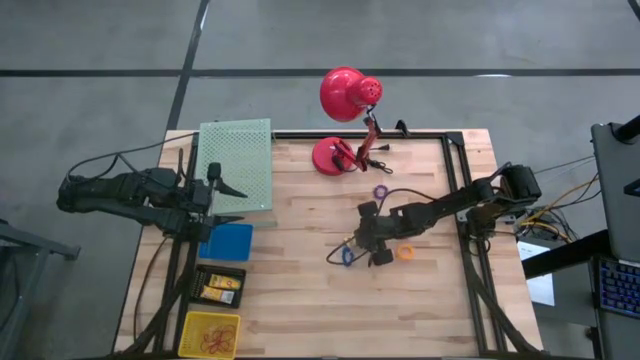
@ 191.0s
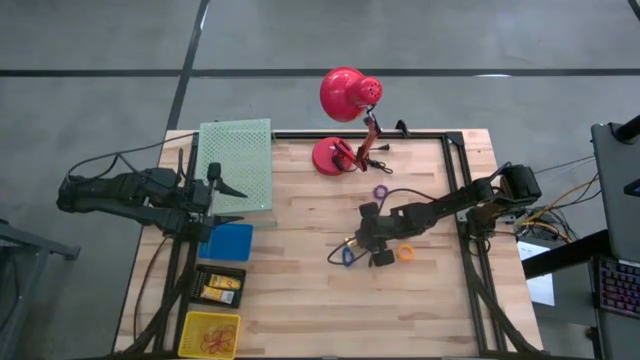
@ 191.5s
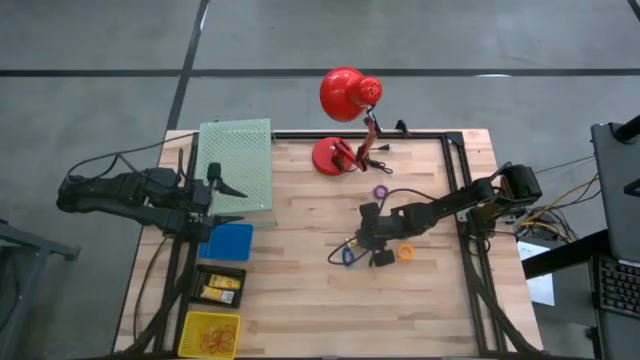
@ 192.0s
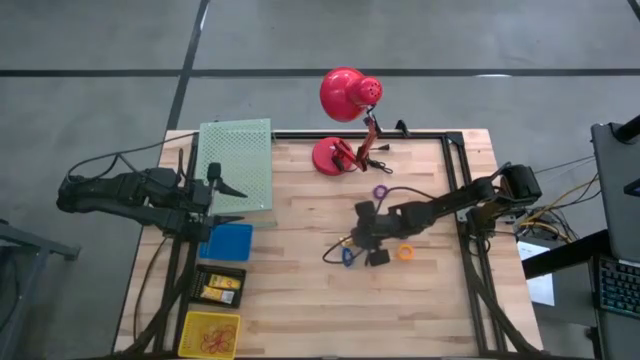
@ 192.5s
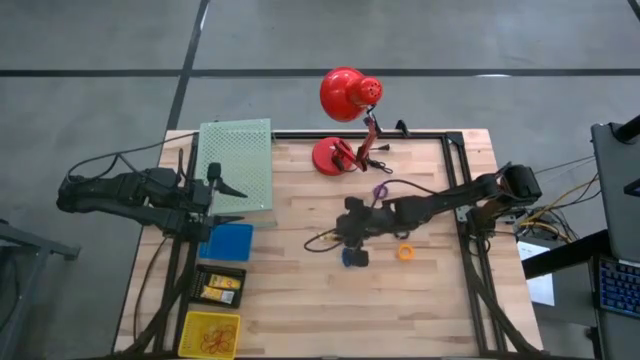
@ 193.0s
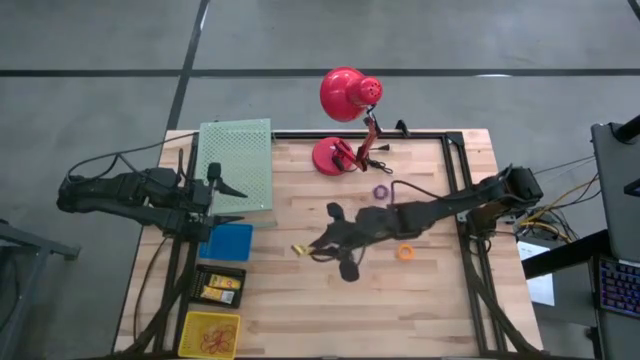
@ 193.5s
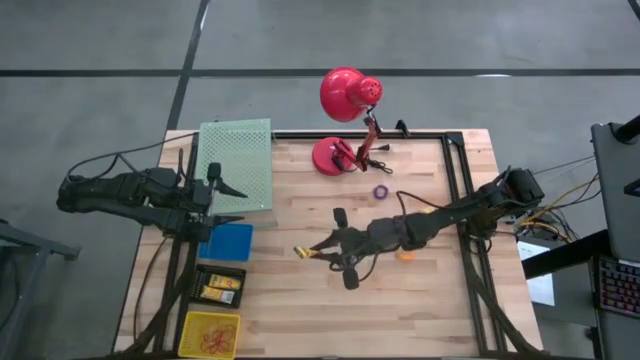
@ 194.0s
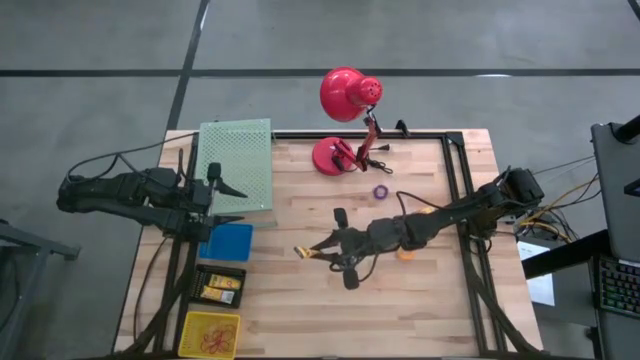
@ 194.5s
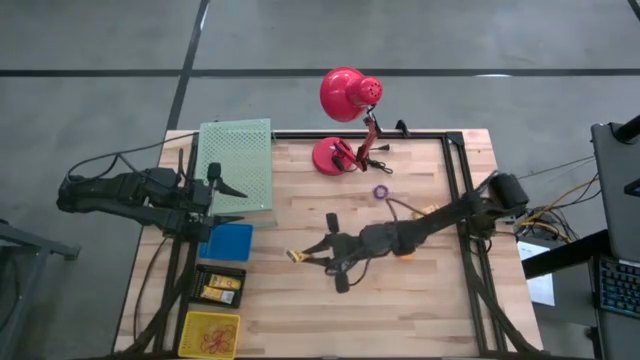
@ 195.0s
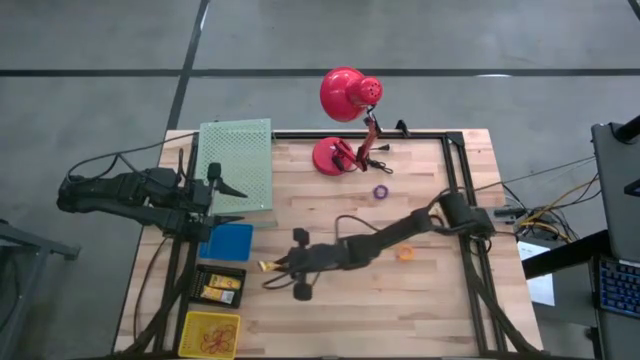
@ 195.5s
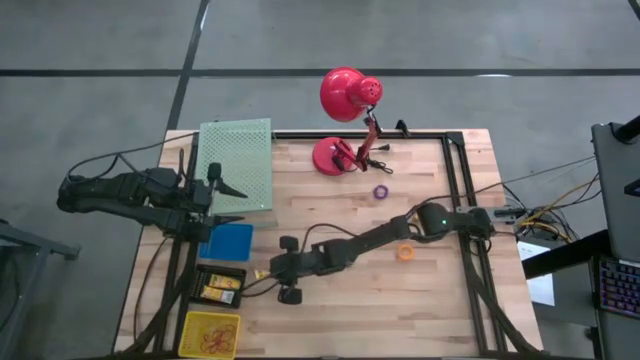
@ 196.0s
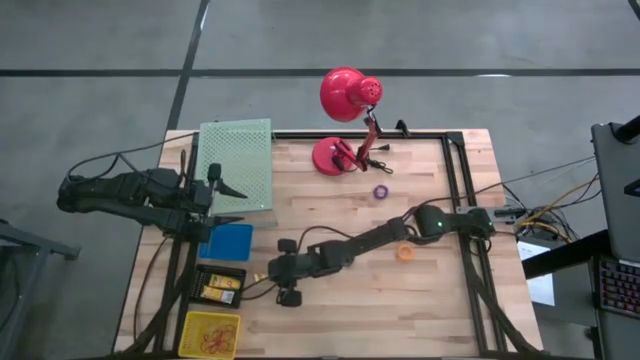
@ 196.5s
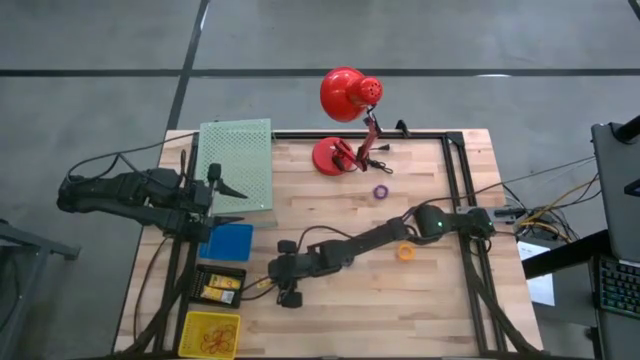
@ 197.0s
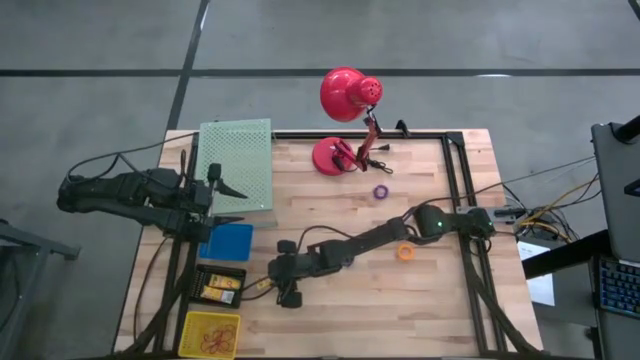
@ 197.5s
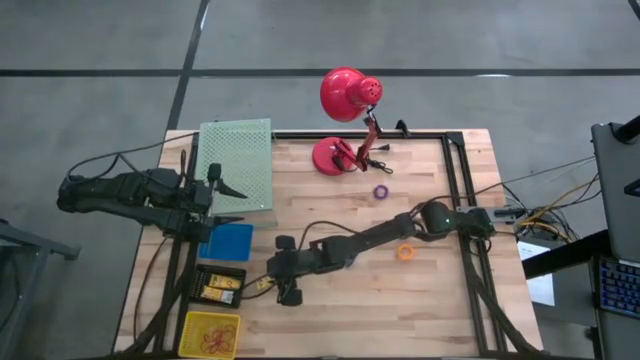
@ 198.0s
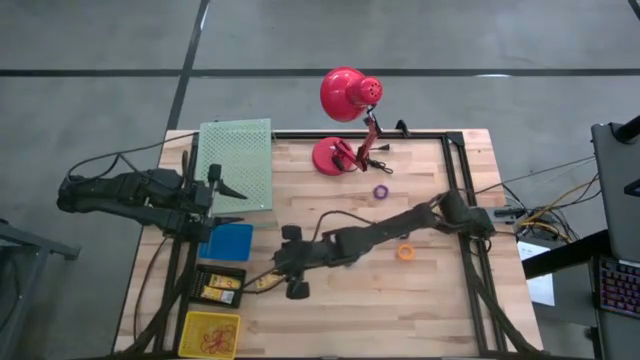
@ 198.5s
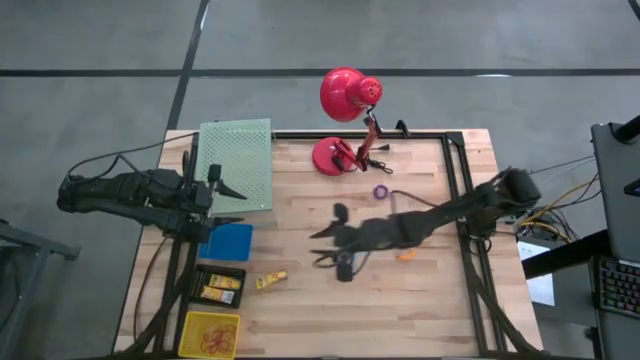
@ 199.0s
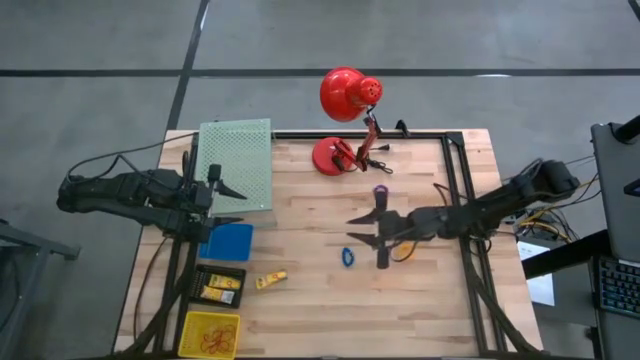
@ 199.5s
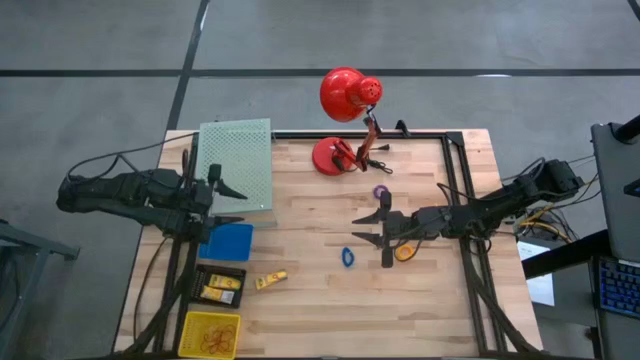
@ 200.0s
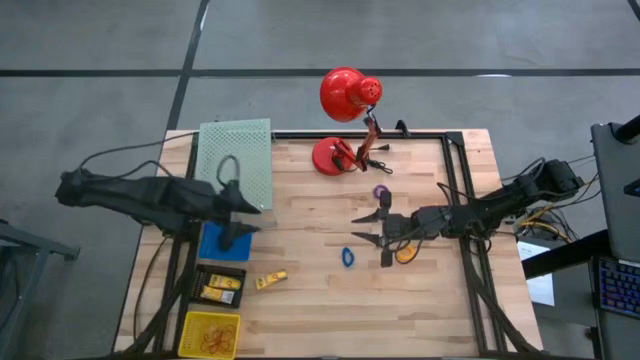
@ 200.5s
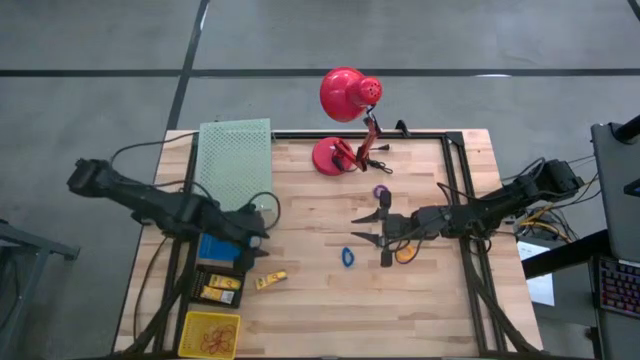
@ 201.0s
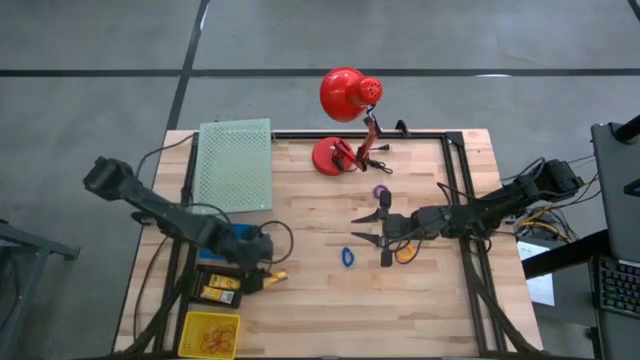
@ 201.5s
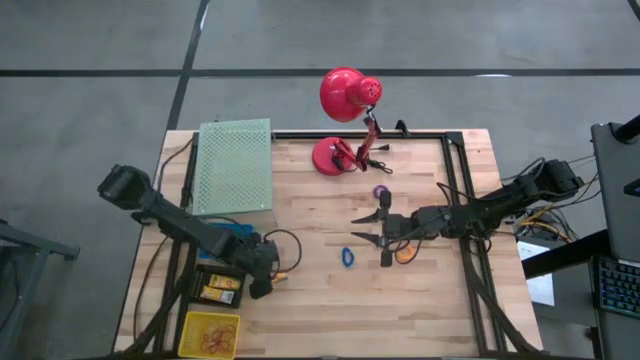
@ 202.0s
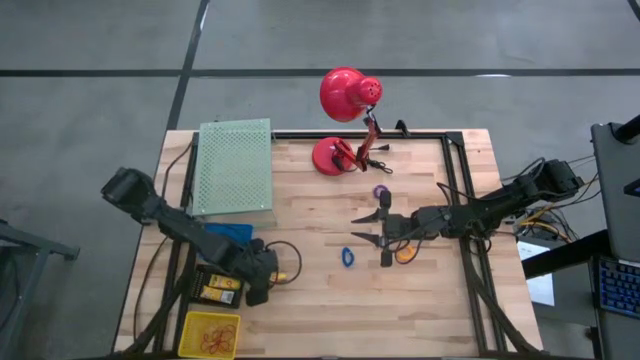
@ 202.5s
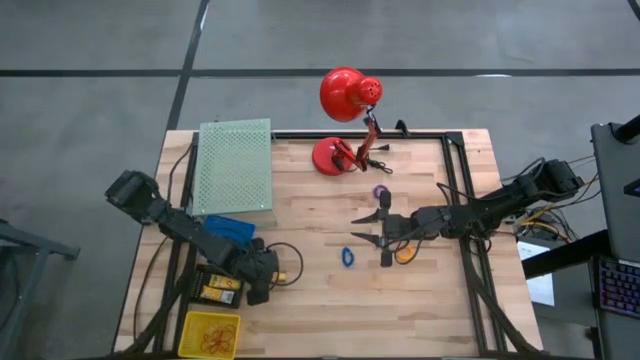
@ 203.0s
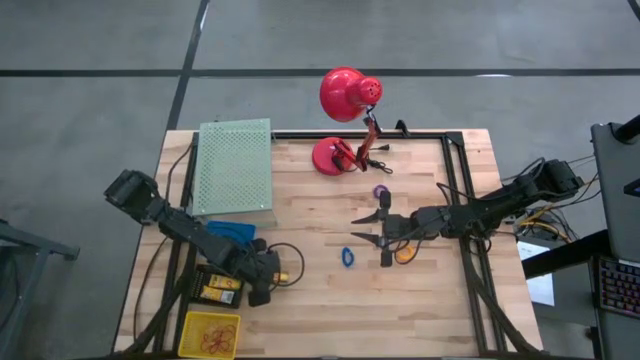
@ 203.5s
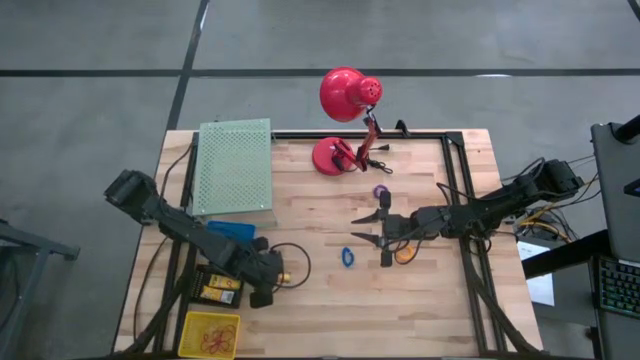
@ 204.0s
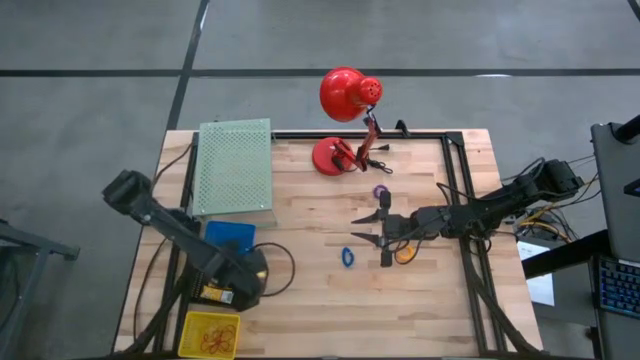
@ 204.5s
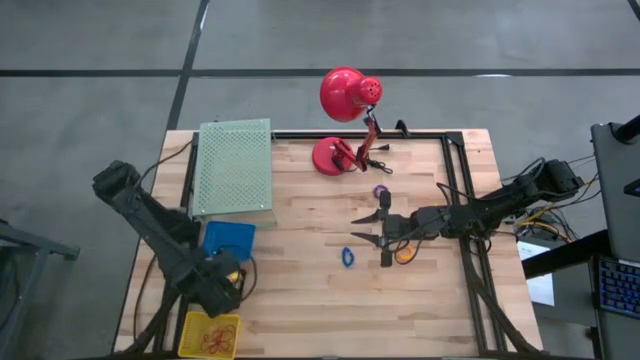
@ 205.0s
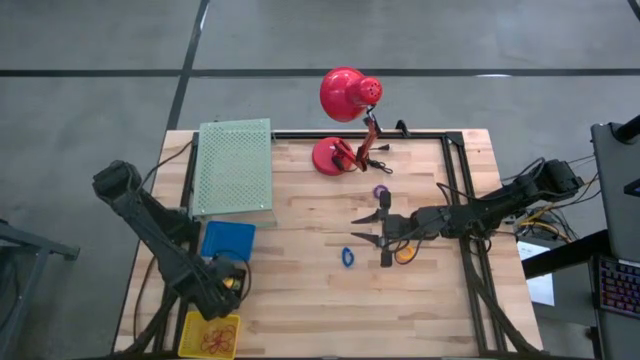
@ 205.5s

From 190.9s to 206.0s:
Task: Pick & Place Office Desk Supplies
Put the crayons box into the black bin

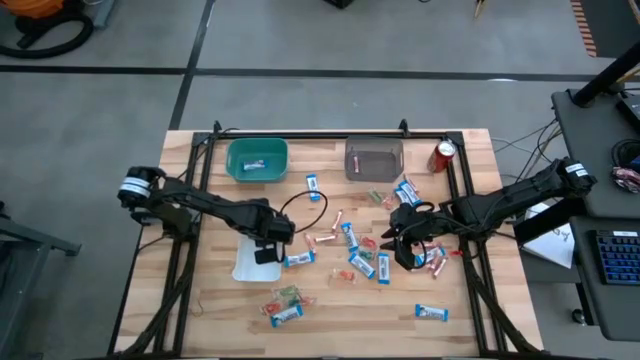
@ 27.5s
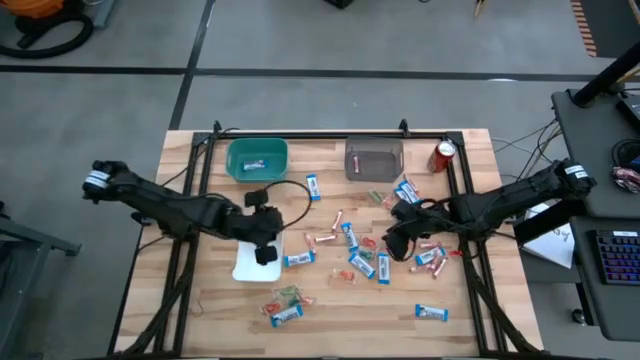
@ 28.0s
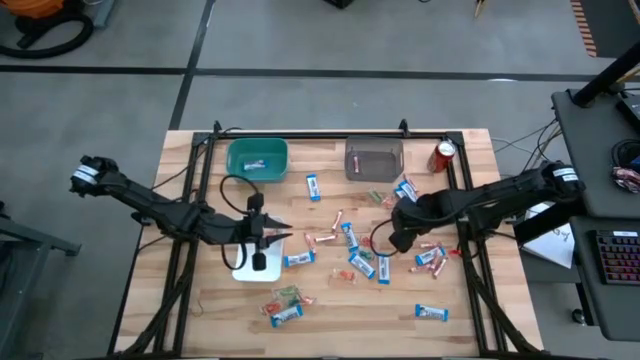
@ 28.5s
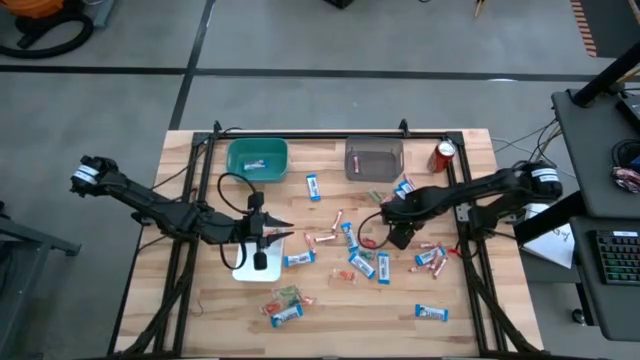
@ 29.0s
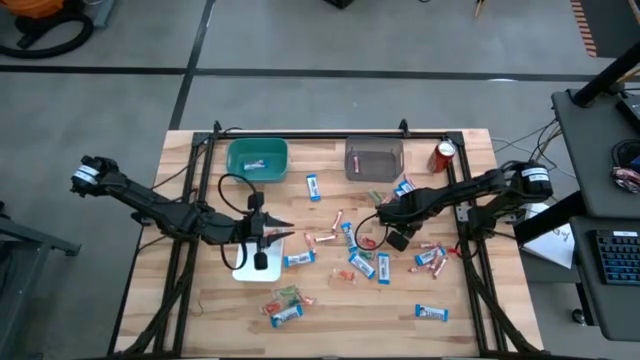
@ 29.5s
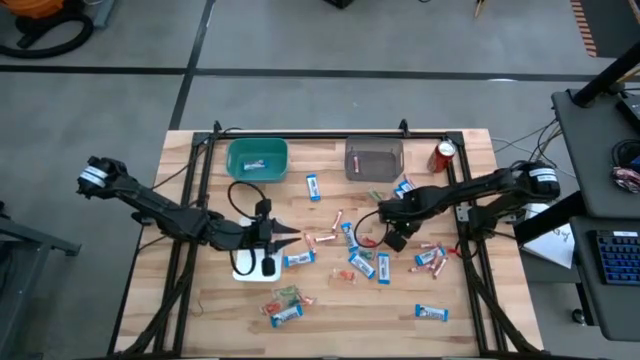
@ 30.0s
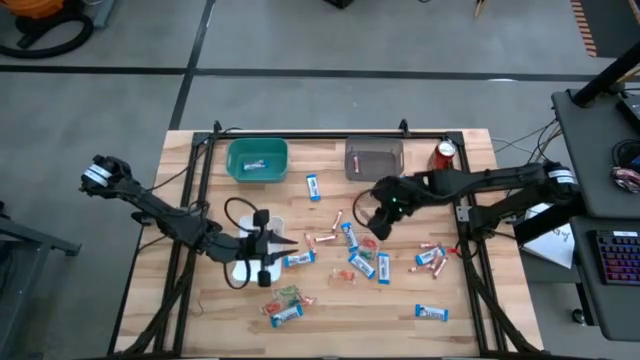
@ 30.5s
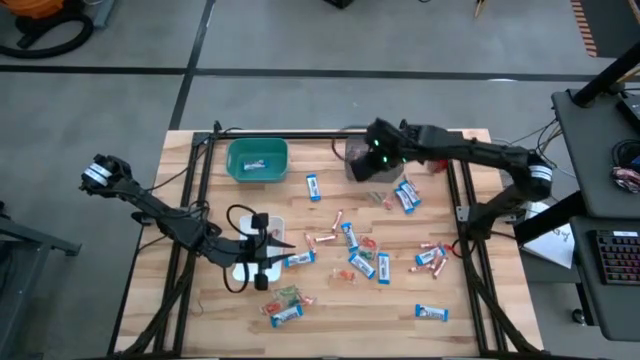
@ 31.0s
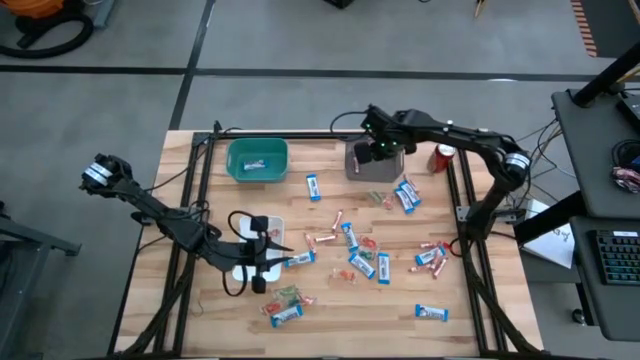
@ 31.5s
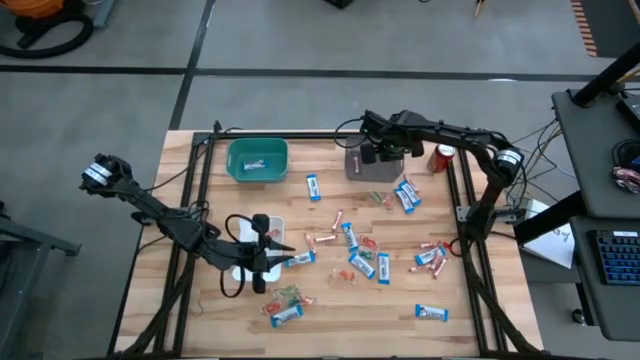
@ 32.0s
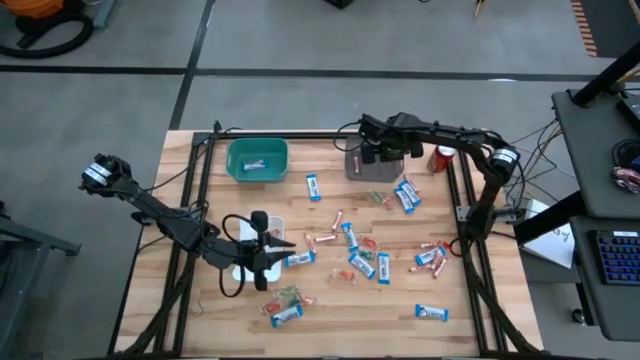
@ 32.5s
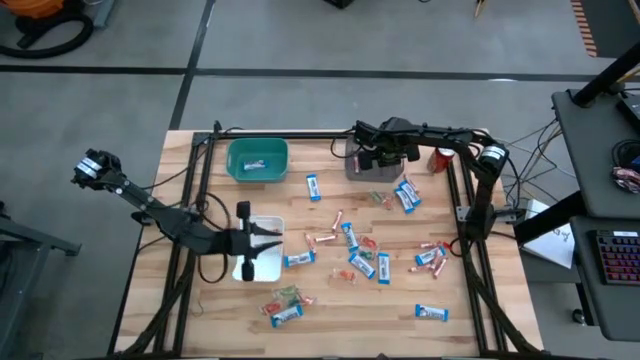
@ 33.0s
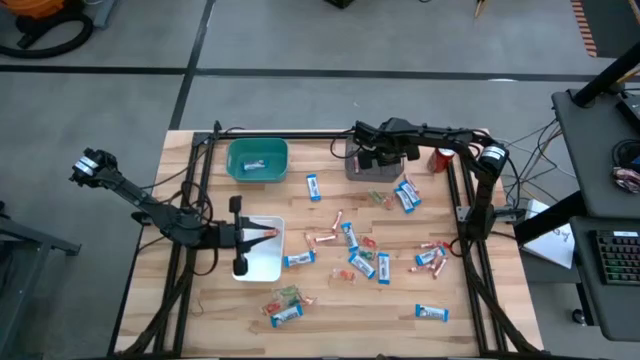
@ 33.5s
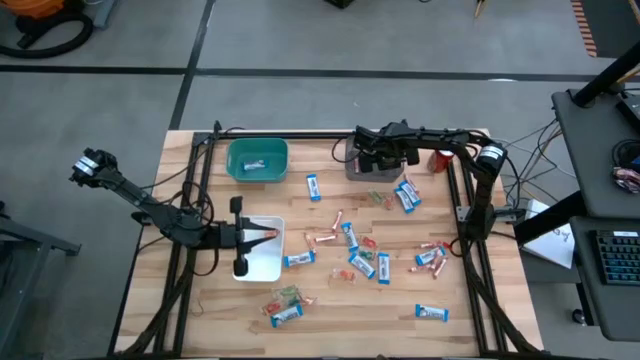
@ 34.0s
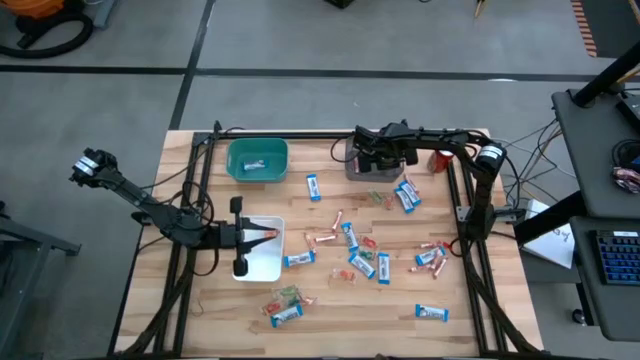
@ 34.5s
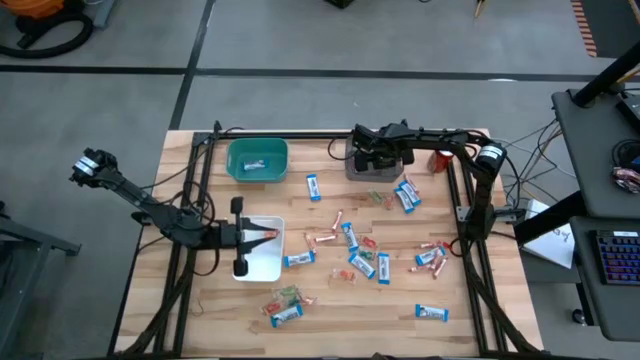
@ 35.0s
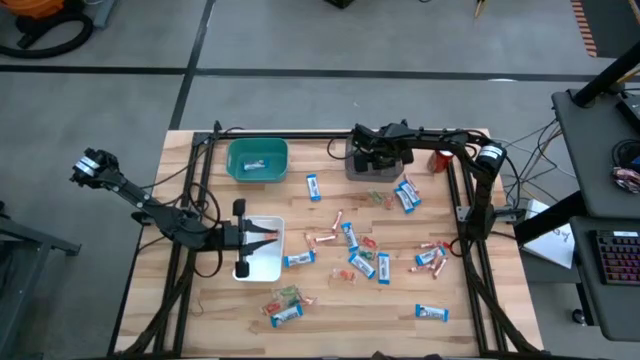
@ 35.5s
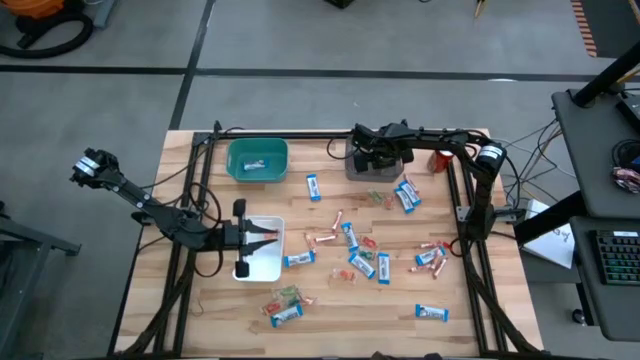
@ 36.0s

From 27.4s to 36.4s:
Task: Sort candy
Put the transparent candy rolls into the black bin
